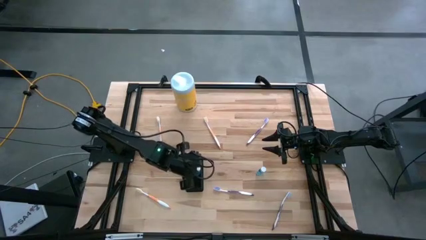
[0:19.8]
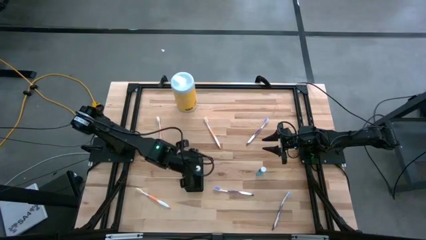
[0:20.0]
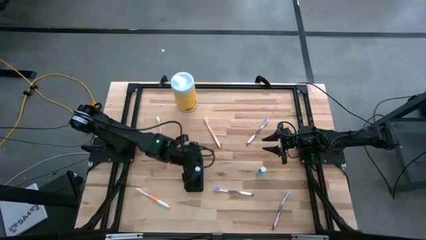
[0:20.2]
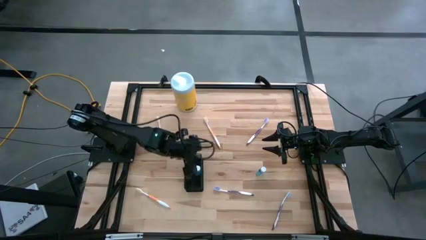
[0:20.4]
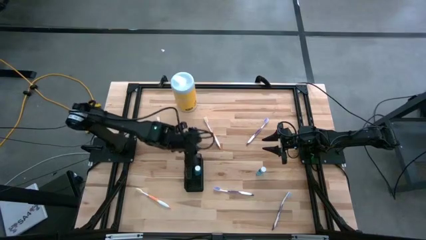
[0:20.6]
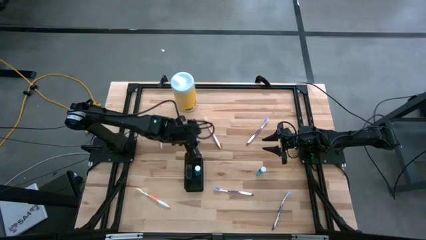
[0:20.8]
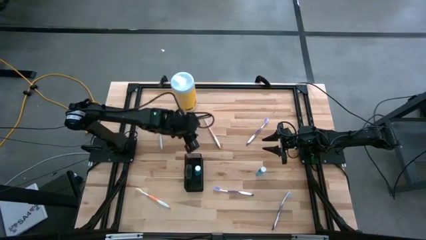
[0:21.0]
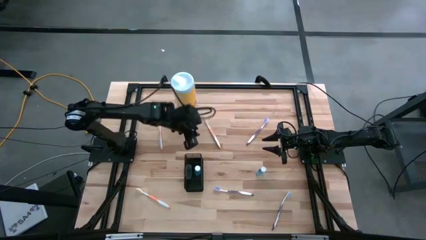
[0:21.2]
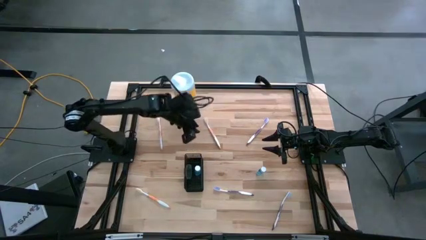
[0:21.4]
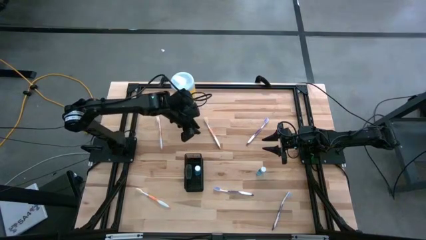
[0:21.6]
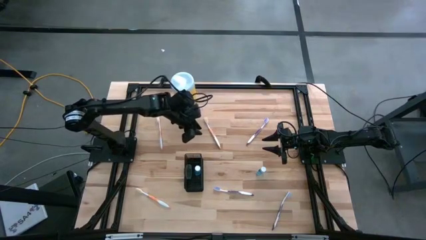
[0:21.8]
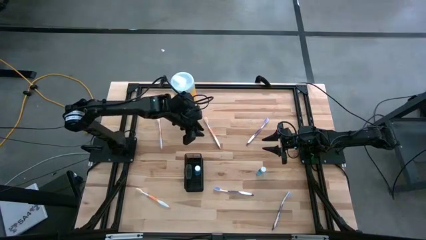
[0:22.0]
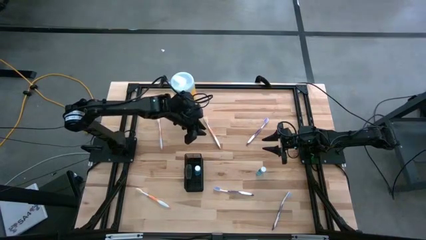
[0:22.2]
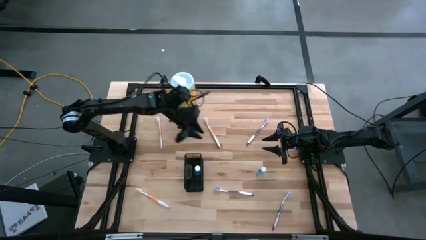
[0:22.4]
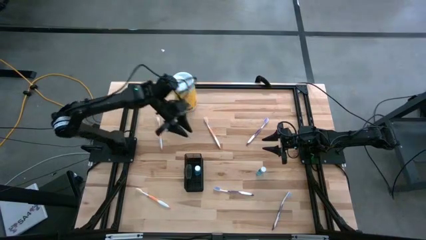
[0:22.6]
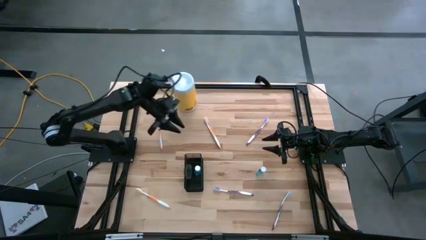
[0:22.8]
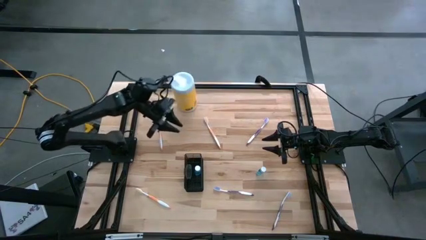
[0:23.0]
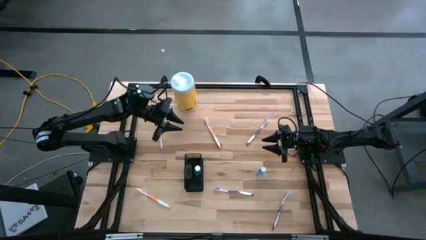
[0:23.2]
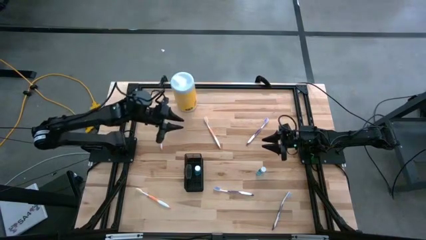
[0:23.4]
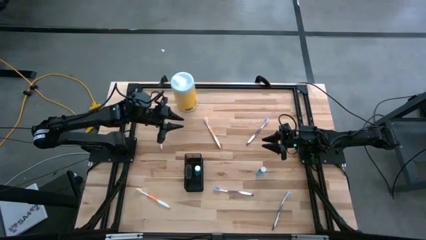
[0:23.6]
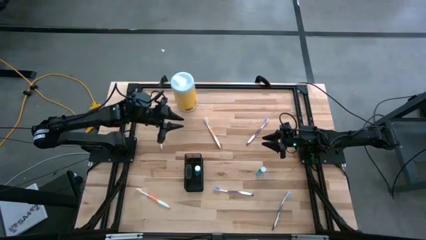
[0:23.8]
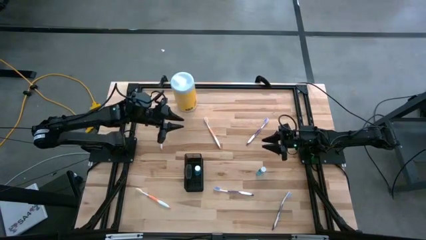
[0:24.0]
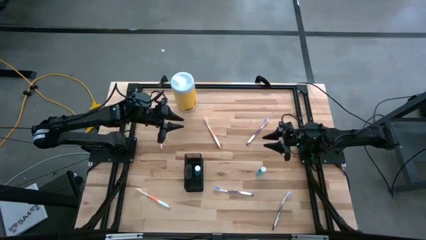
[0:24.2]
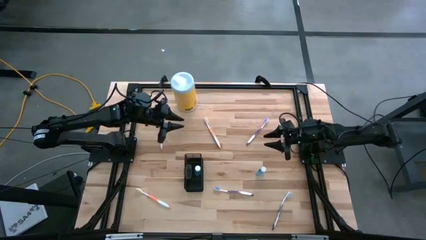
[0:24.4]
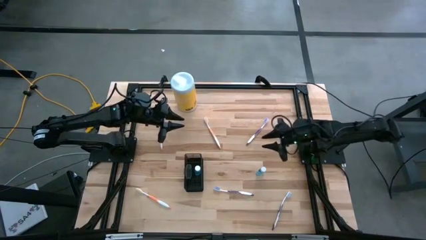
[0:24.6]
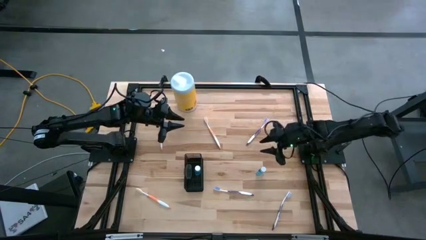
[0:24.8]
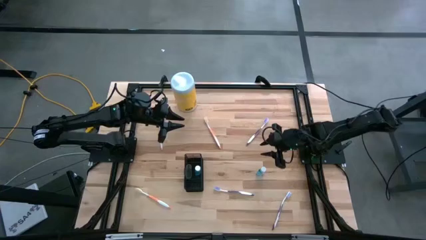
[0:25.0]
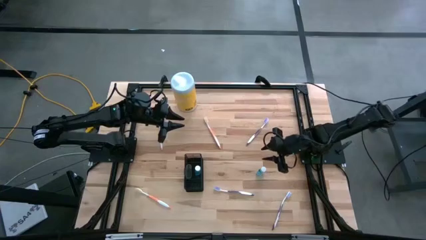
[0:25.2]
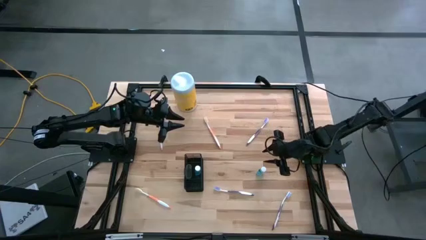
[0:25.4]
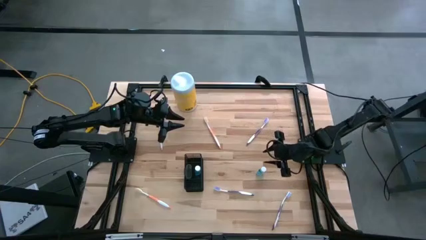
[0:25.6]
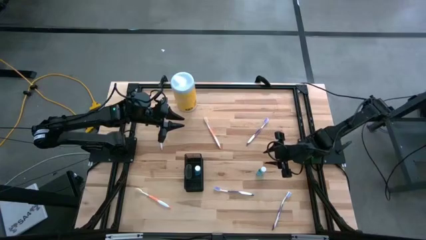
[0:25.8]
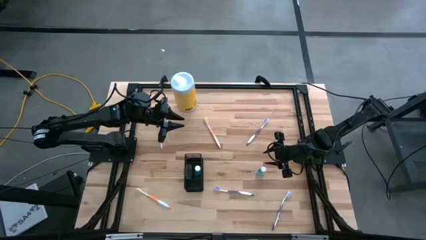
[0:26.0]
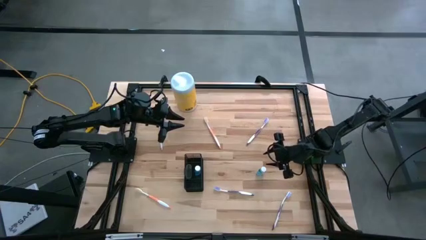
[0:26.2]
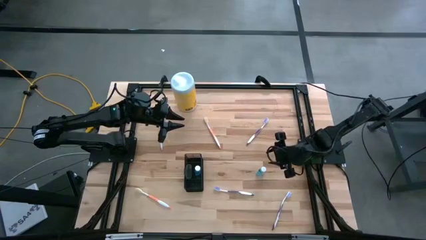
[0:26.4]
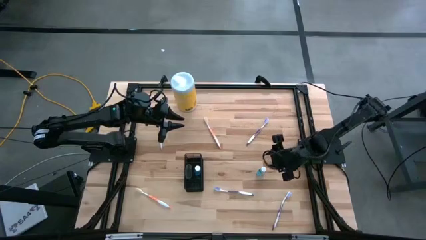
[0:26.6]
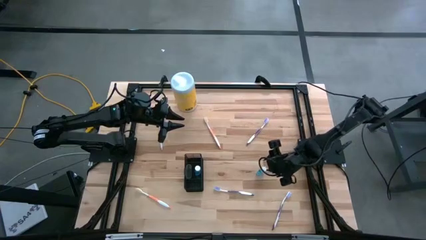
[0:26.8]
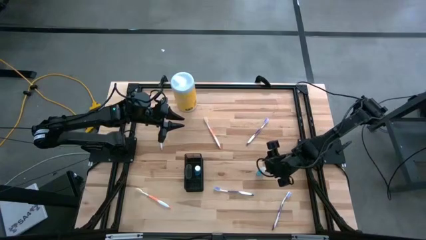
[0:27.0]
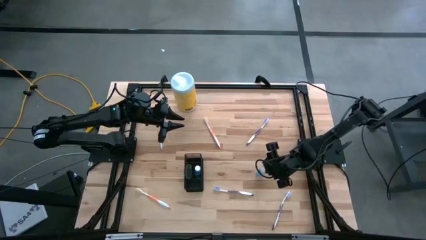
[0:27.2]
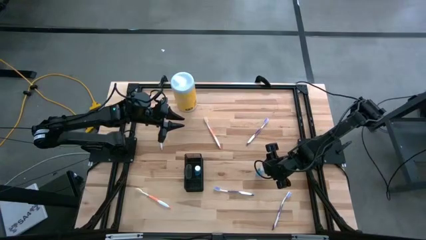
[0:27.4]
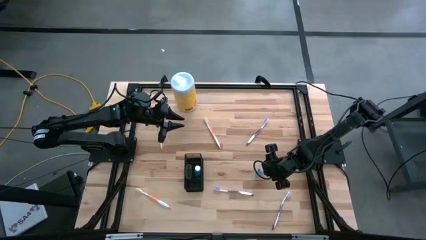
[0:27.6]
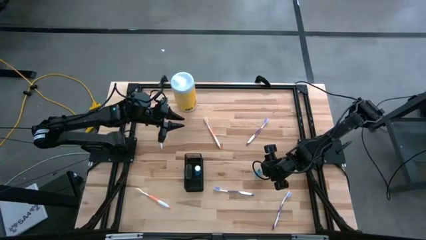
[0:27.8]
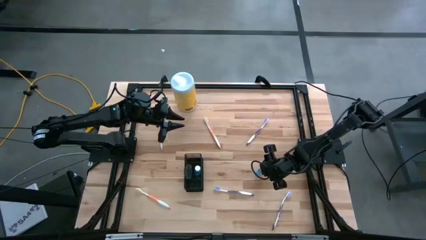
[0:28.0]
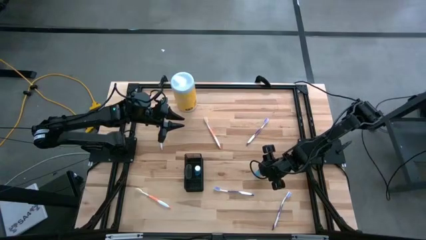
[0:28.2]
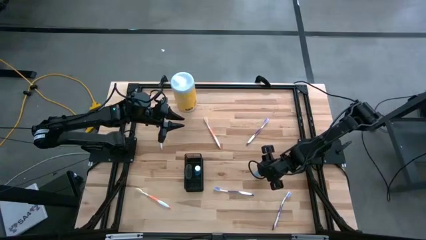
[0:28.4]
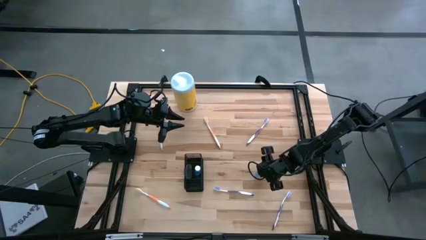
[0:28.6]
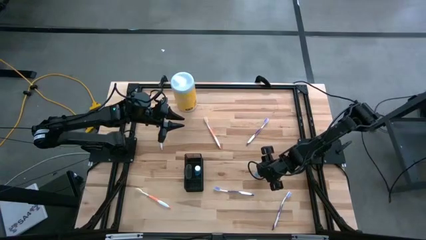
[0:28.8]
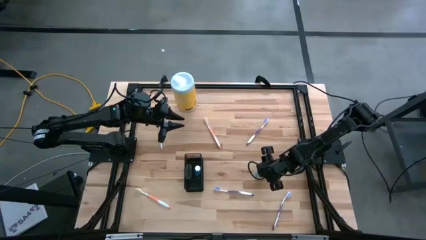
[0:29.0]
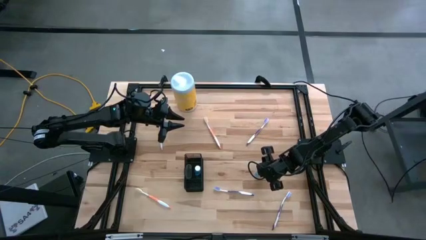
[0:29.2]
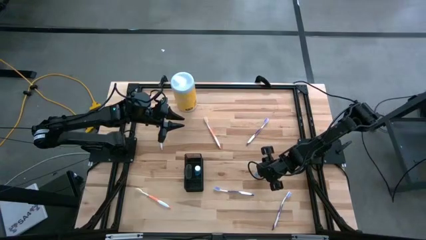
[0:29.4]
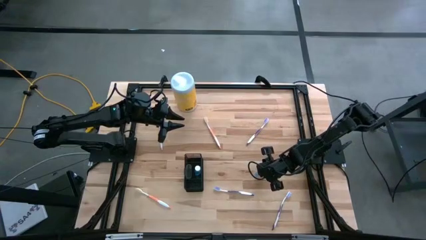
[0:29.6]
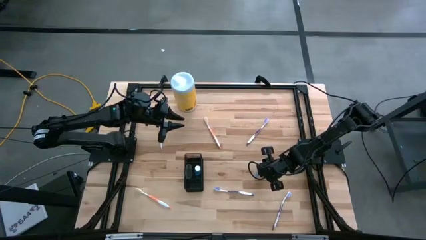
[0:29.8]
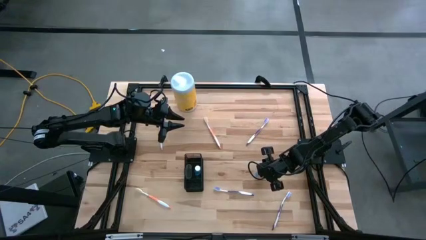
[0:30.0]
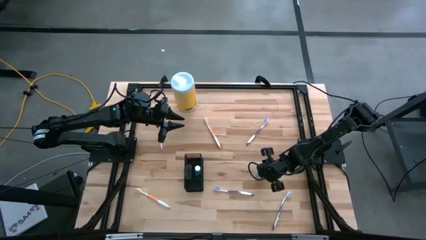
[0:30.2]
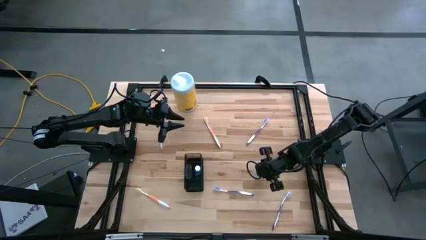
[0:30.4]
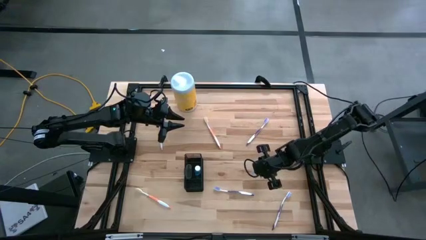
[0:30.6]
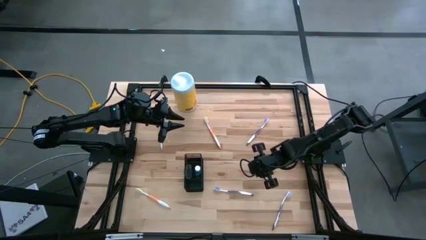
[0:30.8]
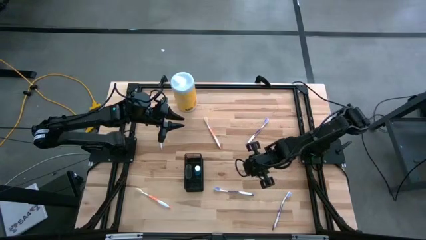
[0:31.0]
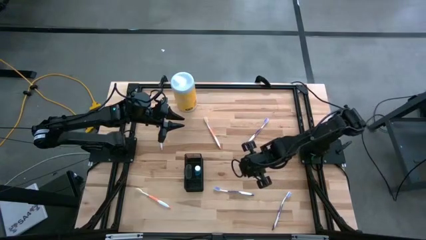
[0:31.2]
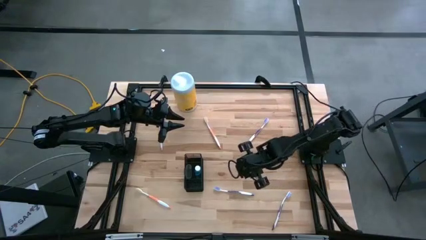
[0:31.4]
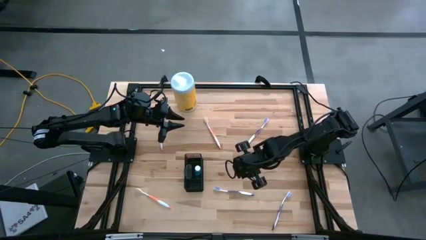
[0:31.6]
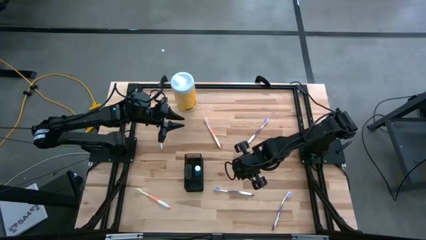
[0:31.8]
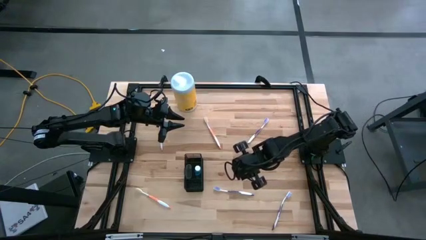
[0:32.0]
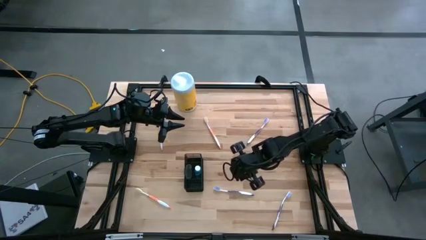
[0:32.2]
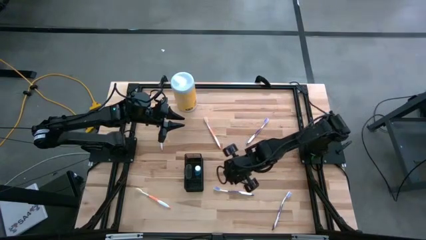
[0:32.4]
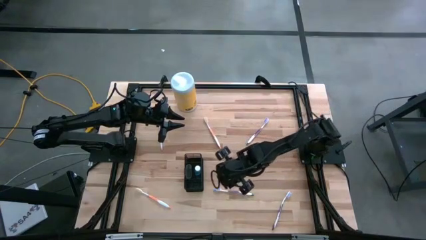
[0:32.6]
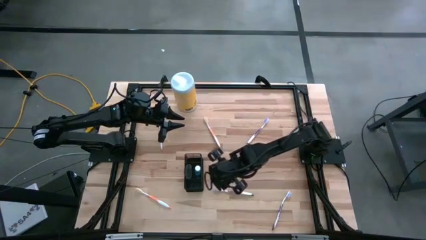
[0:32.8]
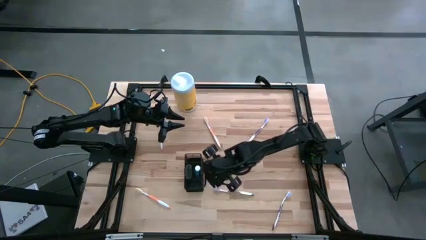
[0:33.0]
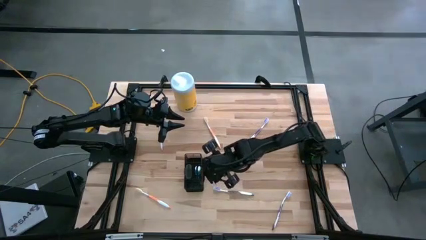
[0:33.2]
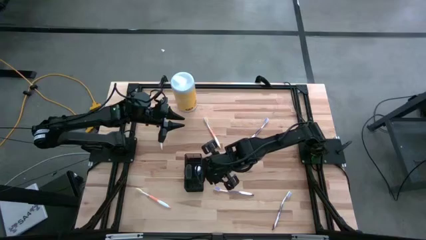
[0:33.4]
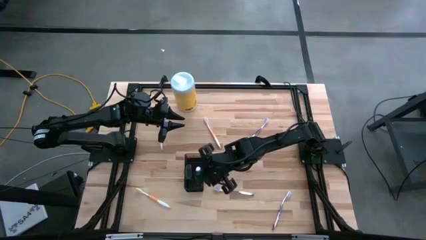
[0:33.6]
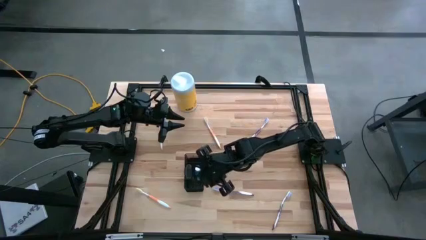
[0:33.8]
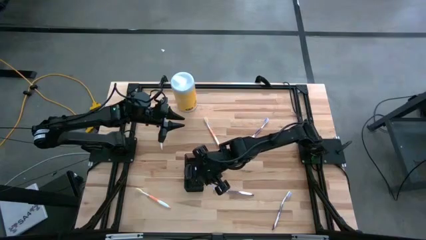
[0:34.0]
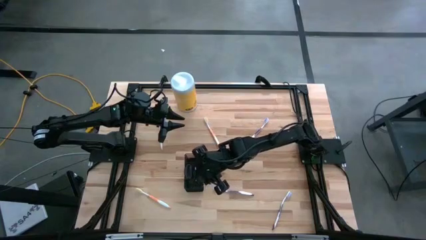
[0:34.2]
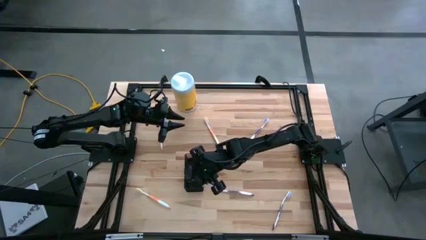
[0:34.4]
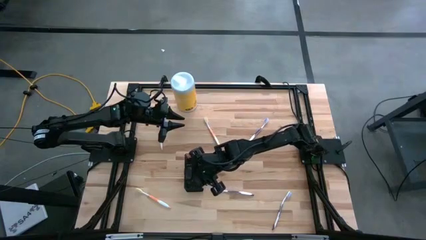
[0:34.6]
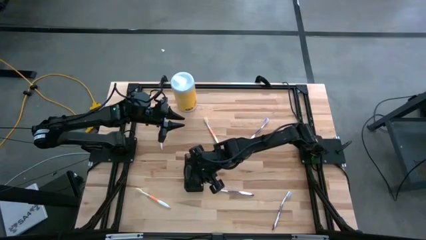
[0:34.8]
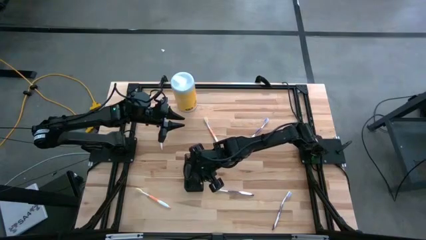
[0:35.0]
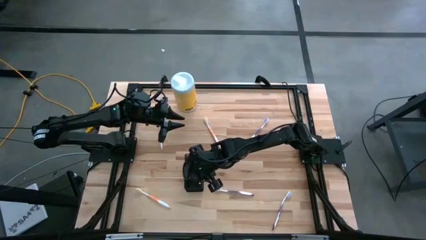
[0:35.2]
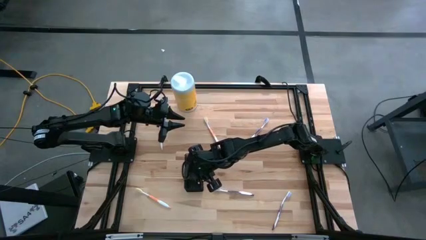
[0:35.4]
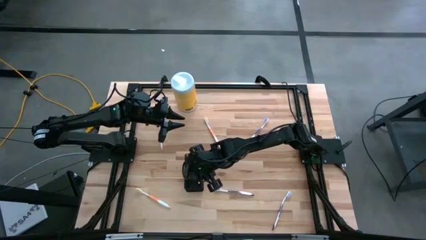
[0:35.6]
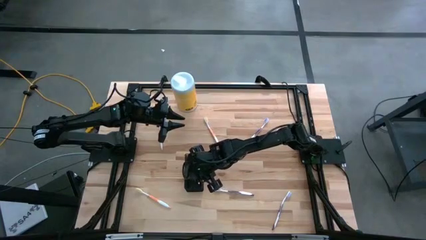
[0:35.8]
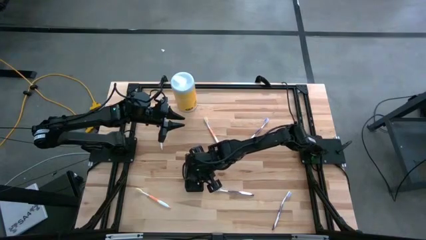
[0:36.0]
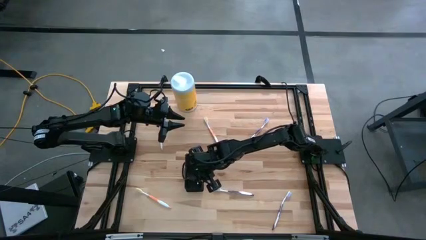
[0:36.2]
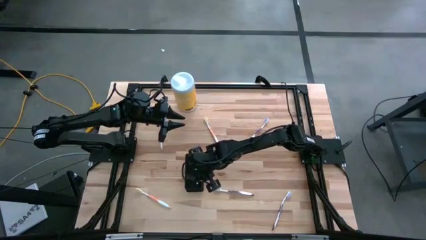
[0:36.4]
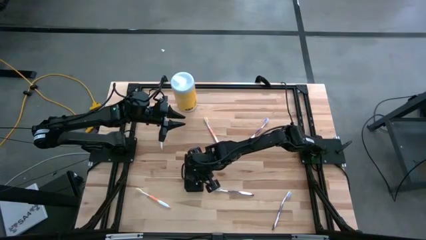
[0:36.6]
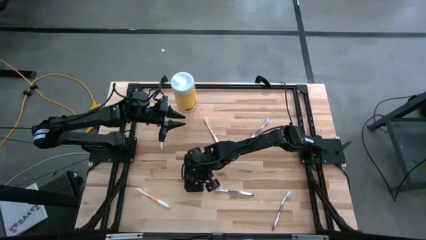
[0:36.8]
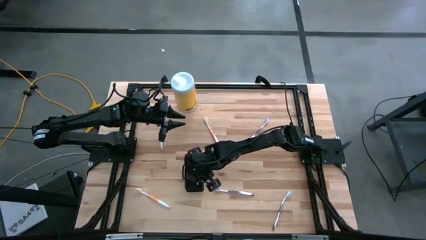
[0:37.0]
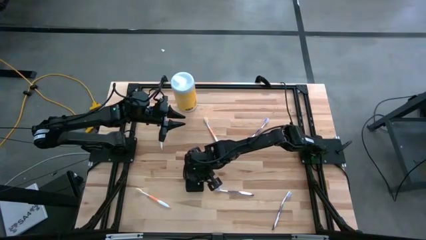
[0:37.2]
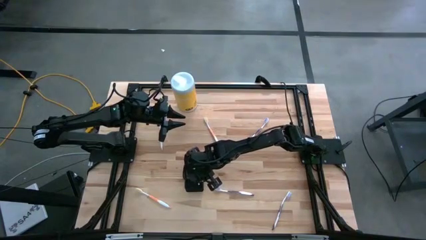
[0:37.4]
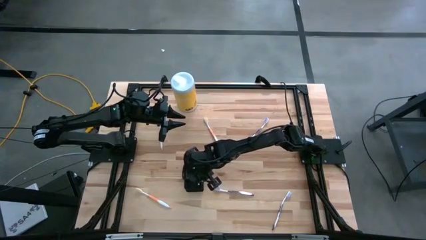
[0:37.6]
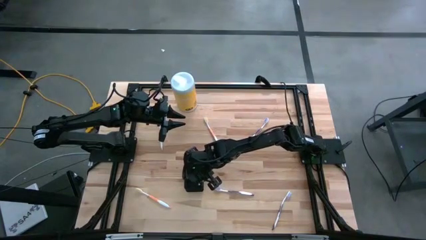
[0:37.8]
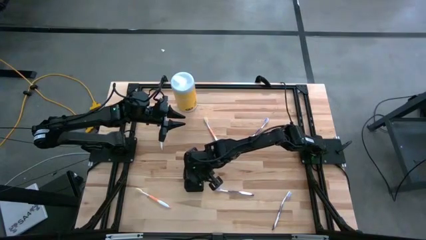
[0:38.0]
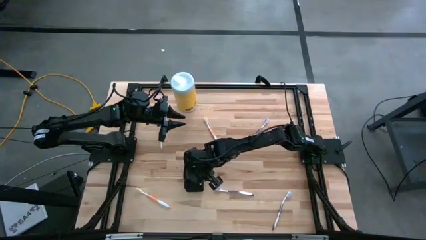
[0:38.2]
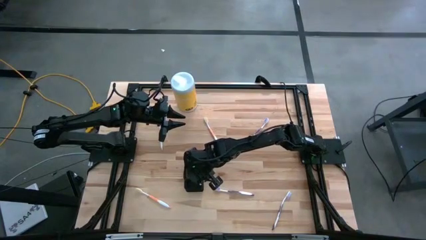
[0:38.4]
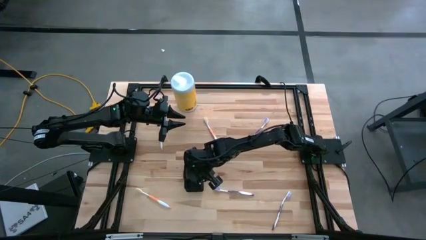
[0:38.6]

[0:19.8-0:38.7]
Task: Pick & Place toothbrushing station
Put the blue mouthwash into the middle section of the black wire organizer
